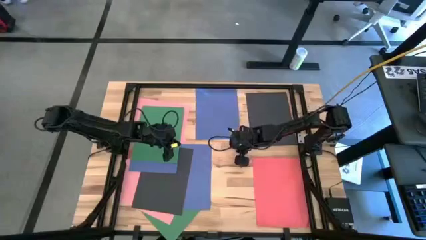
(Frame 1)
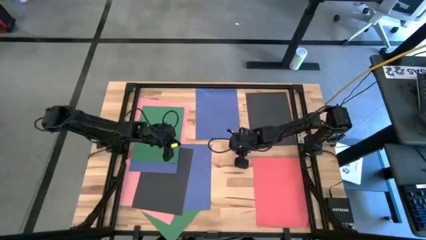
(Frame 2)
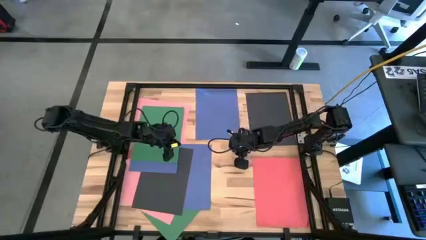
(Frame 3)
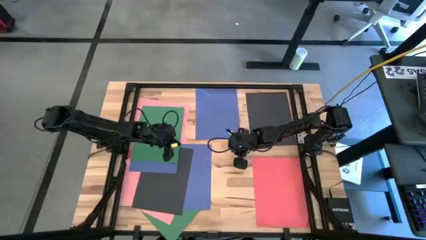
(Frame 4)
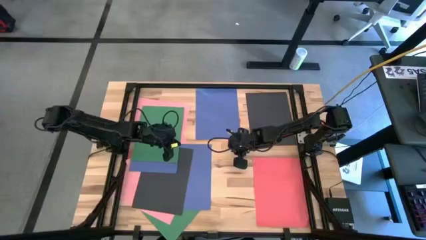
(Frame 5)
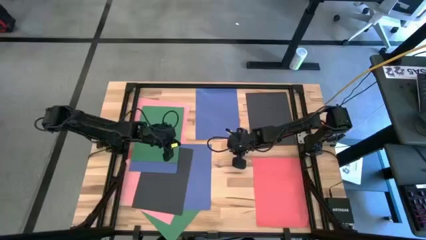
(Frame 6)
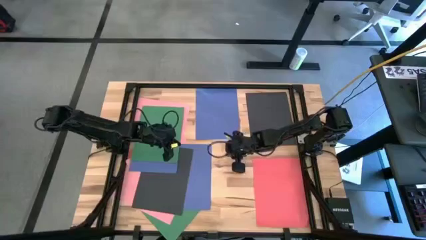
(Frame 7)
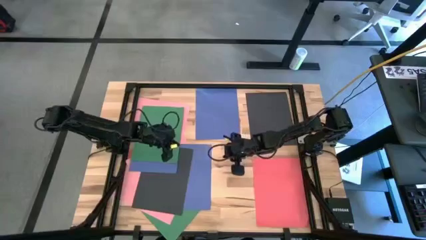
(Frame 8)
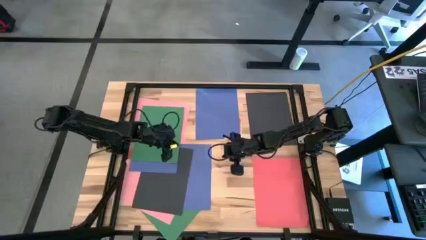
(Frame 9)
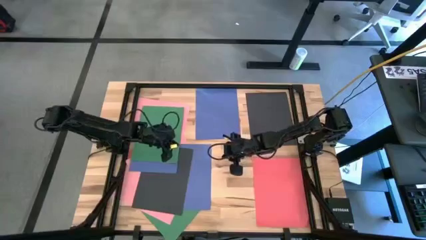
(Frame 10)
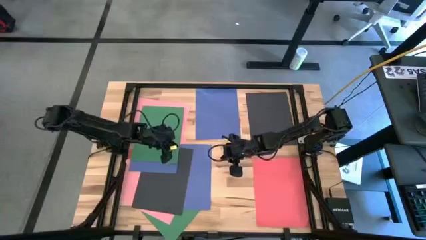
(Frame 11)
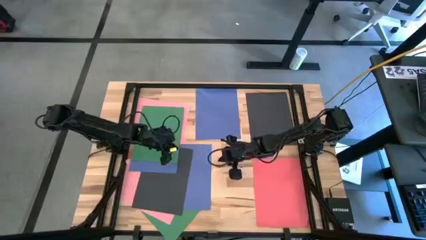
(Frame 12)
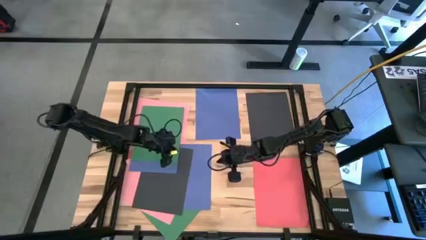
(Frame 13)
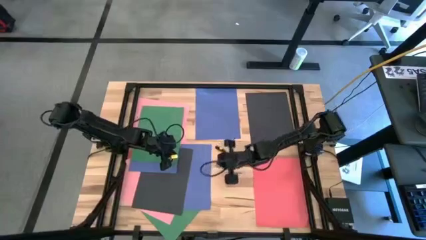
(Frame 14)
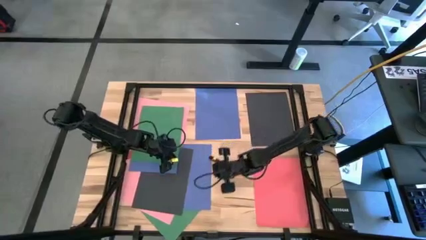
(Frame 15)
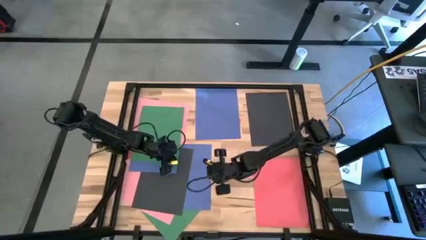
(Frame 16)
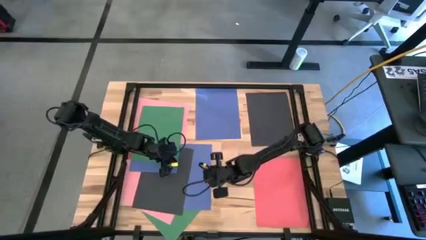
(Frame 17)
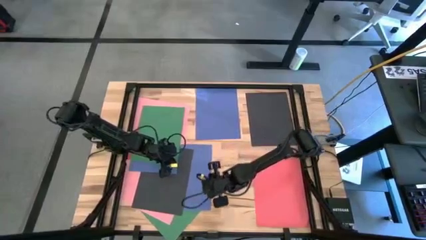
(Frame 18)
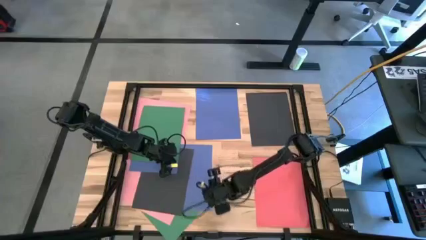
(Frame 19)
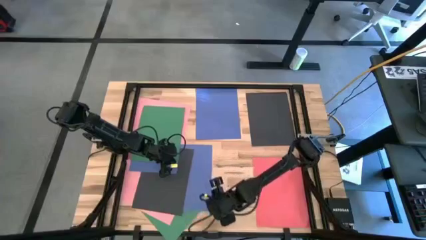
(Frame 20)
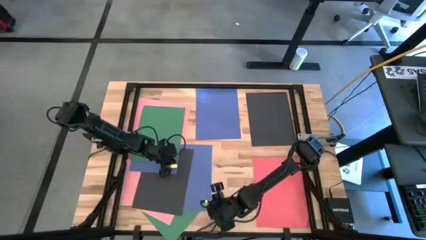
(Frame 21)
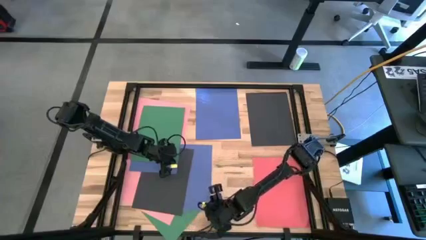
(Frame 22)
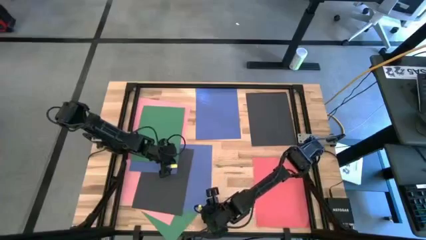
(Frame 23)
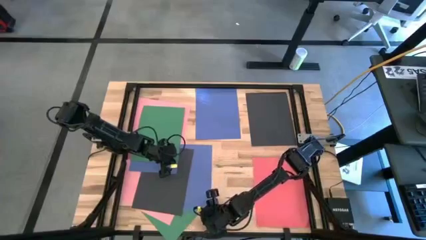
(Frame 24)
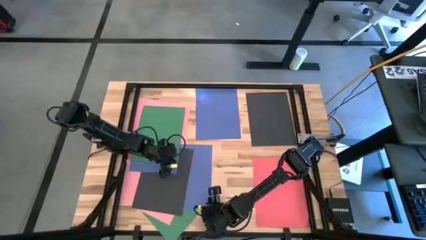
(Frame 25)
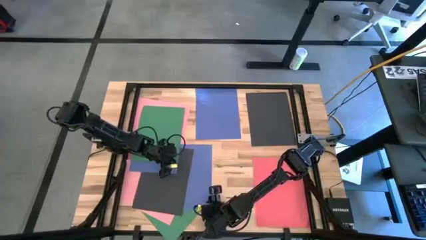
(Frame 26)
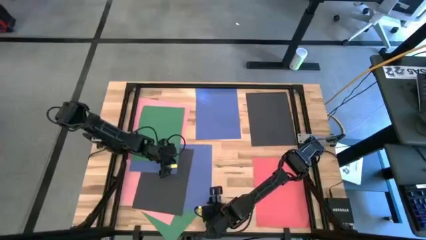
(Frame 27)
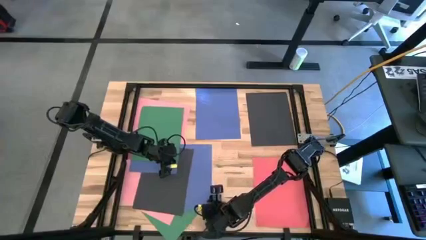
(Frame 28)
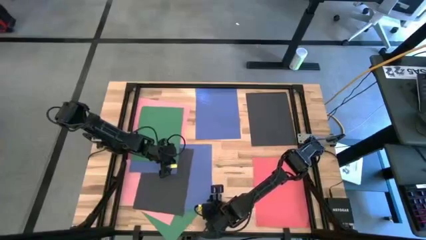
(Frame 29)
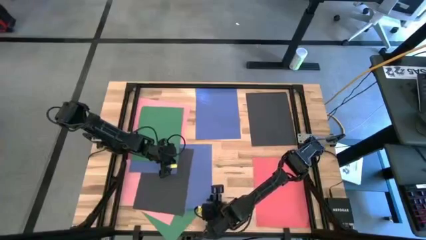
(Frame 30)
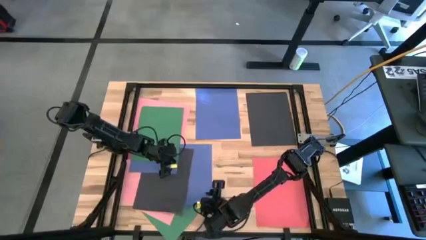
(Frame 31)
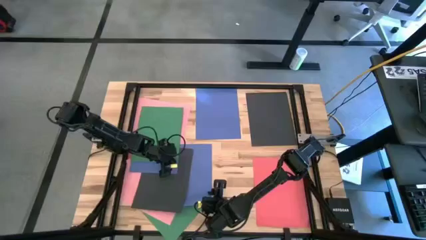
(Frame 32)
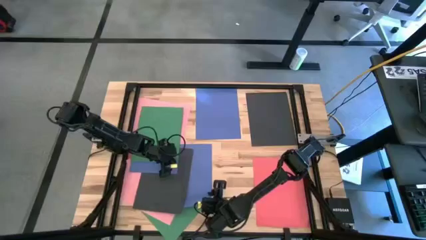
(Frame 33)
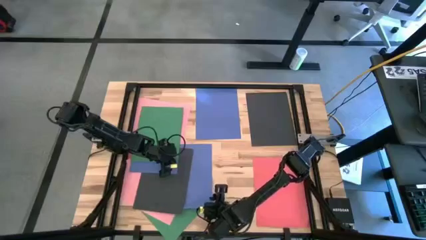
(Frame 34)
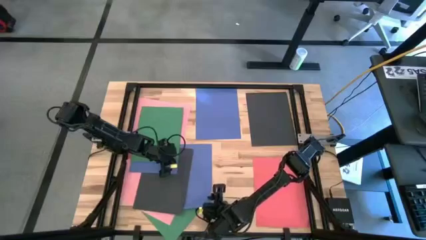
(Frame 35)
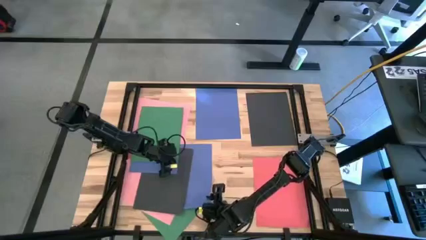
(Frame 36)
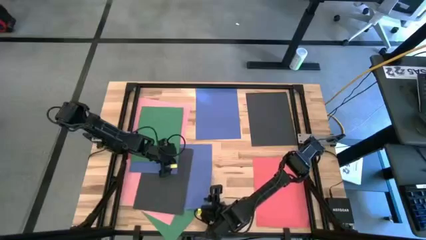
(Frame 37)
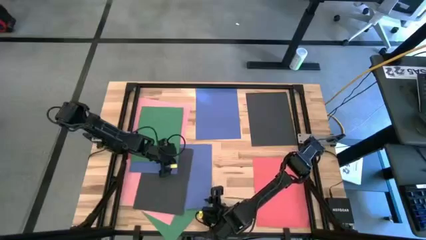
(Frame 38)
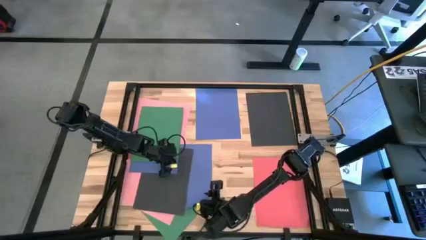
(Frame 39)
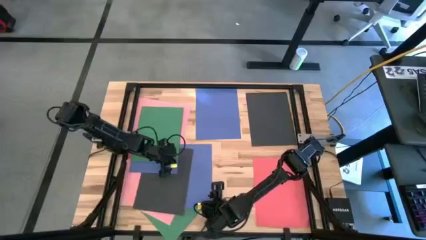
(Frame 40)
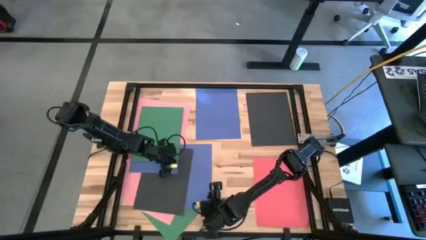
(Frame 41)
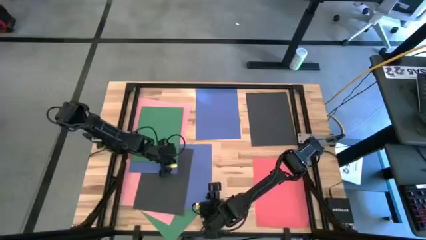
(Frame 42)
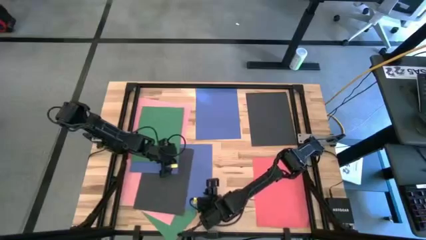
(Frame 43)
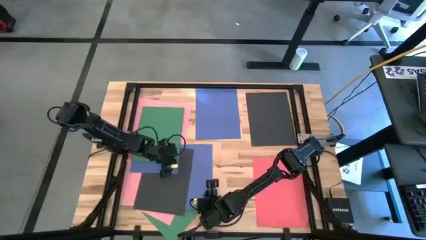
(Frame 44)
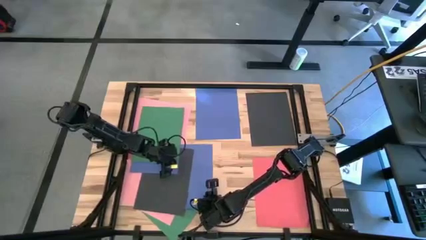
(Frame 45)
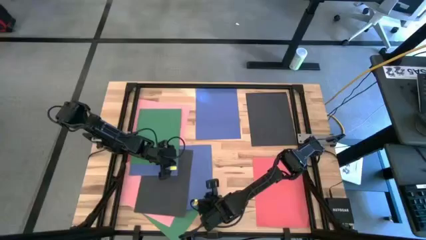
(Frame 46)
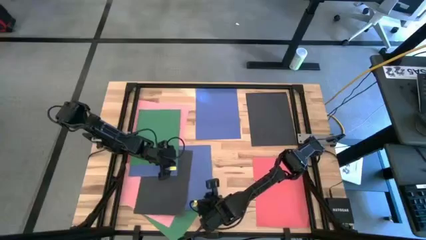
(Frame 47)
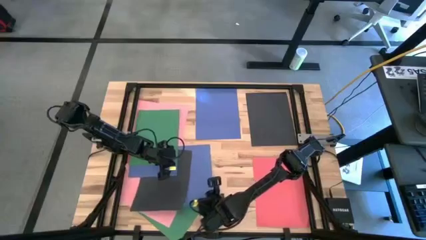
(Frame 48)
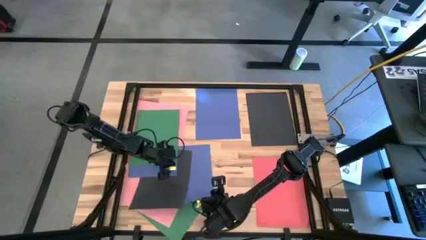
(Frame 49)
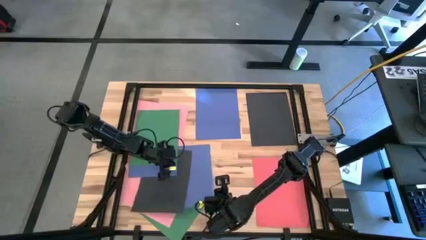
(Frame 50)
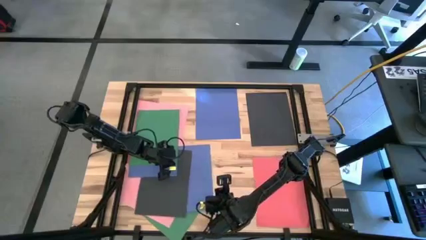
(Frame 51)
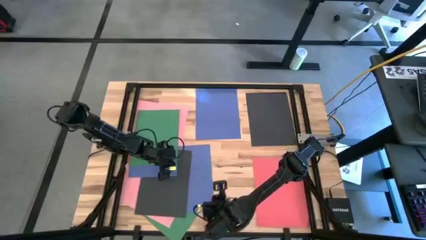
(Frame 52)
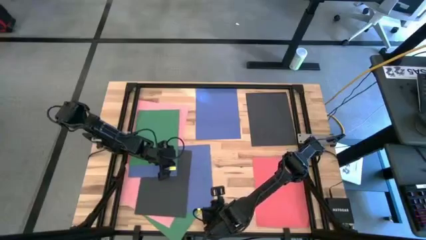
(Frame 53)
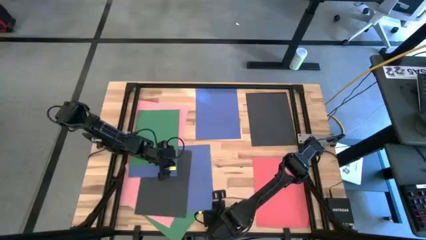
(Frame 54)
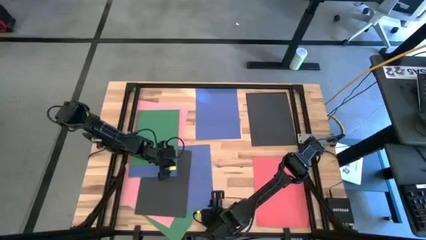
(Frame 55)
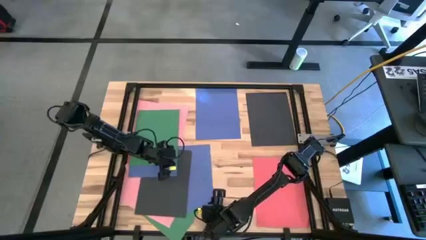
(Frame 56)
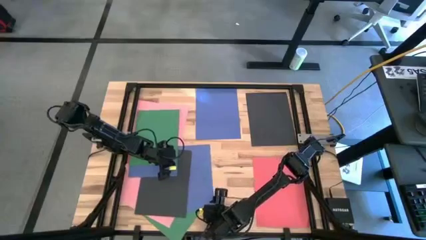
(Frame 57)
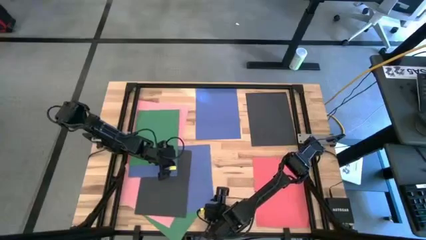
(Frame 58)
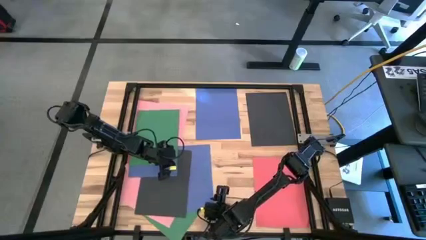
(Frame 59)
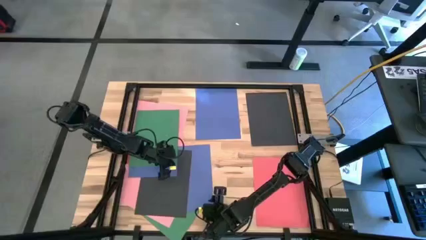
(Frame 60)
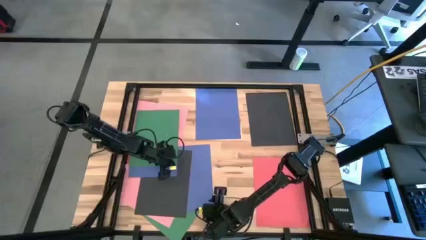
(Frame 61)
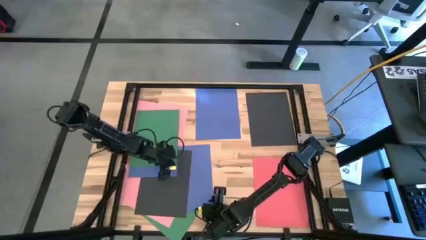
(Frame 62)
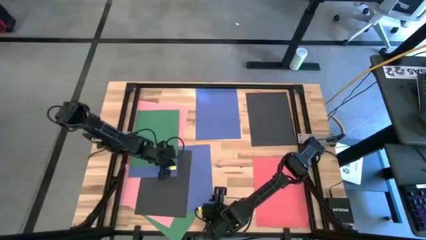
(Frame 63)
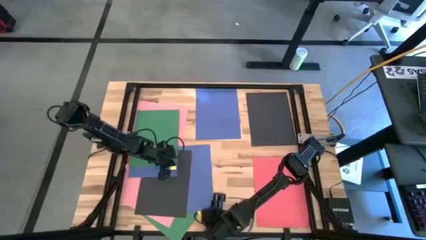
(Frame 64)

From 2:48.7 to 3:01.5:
Task: Organize paper
Stack the blue paper on top of the other blue paper on the table

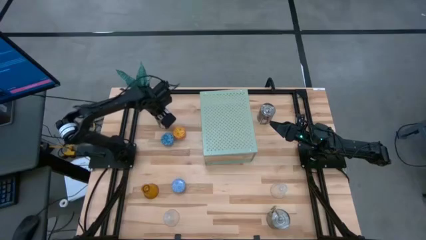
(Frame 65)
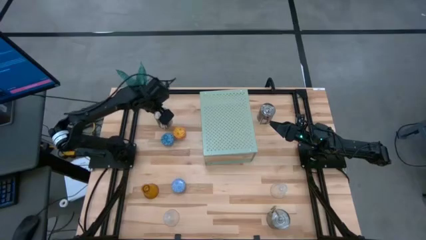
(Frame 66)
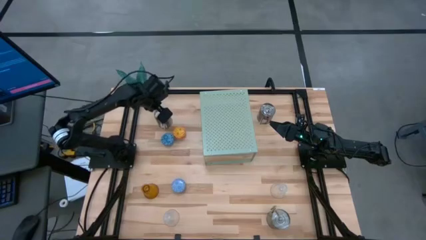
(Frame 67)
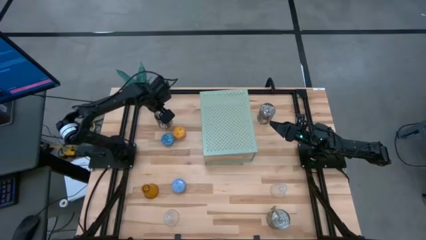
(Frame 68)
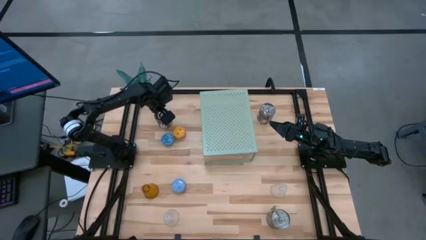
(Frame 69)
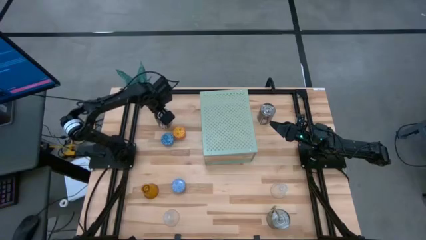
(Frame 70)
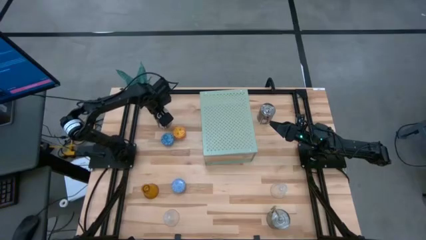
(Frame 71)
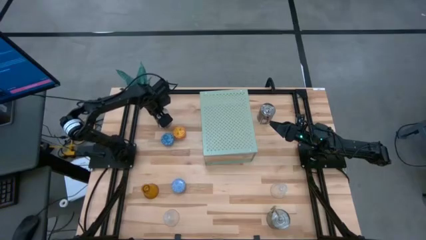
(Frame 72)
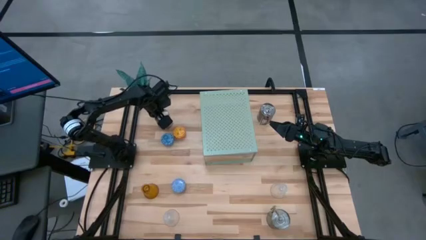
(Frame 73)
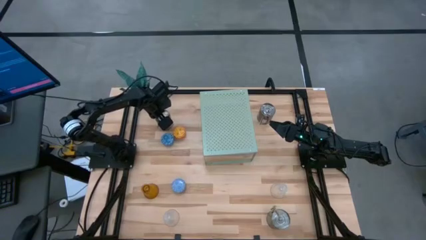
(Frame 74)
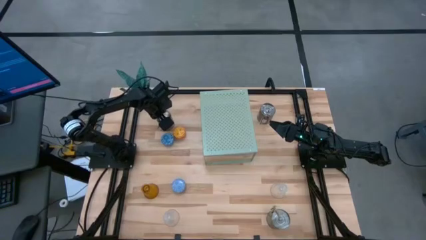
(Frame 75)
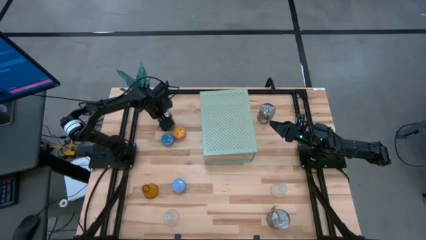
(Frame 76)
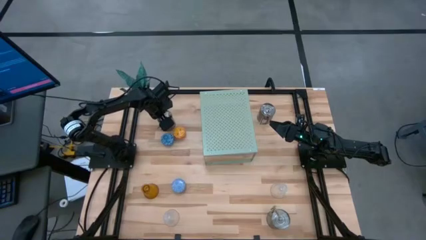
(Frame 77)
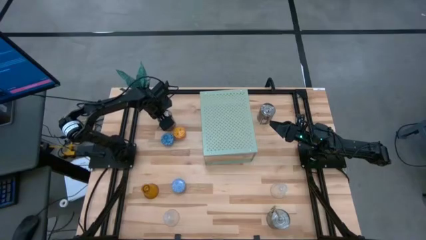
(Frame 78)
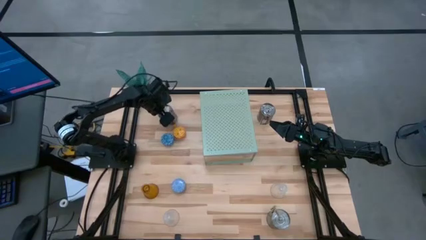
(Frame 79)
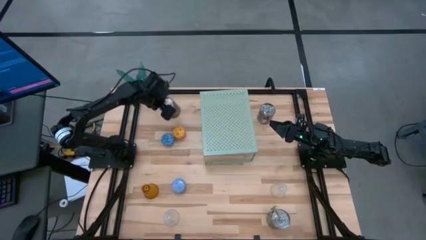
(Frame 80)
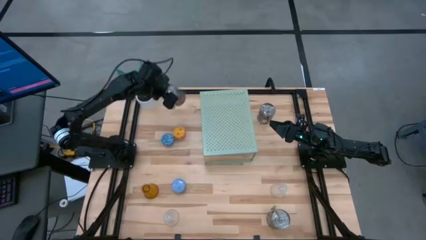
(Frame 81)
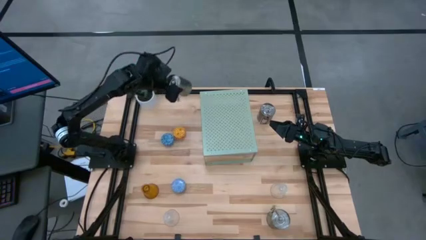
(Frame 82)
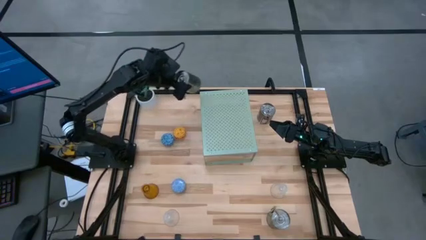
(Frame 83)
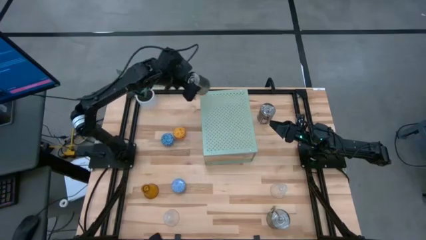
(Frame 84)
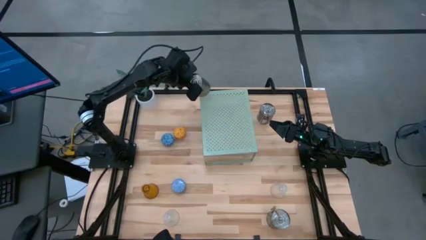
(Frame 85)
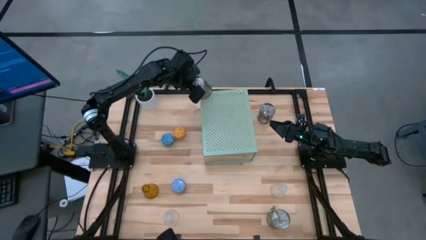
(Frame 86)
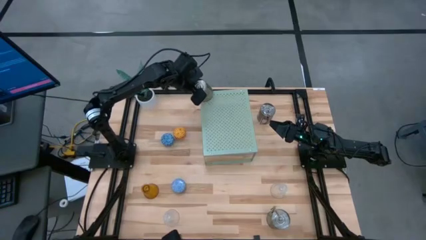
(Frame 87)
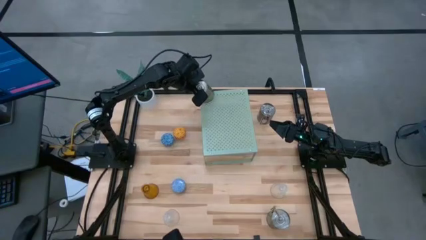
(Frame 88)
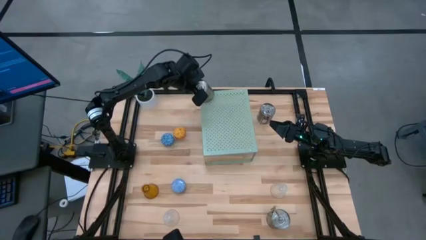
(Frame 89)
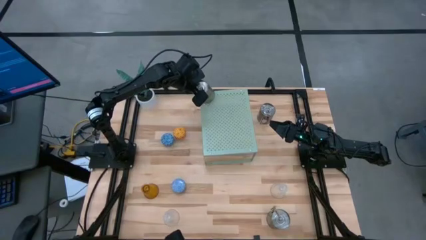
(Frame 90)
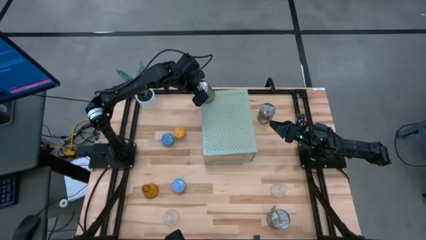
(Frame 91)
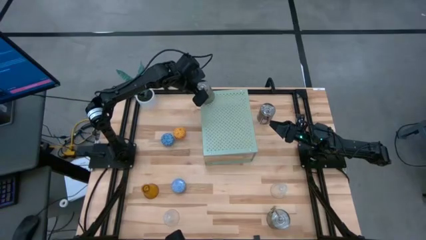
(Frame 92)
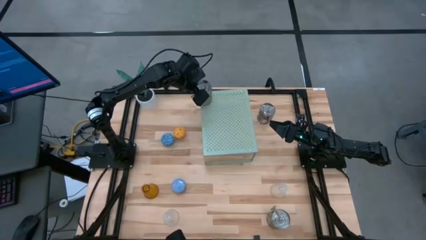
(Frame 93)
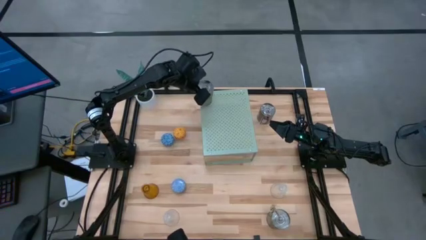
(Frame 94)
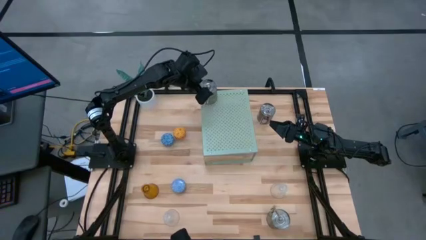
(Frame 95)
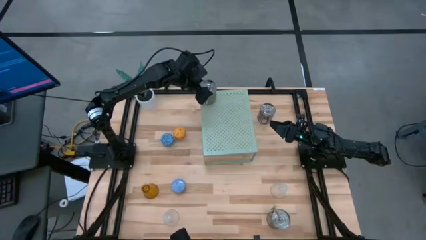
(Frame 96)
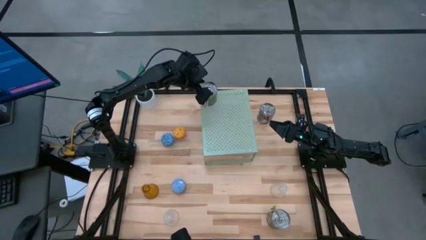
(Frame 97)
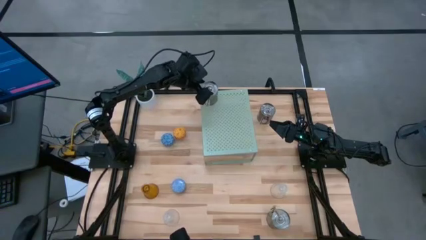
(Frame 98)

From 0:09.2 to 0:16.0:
Task: Pick & Place candle stick holders
Put the top left silver scented candle on the shelf
